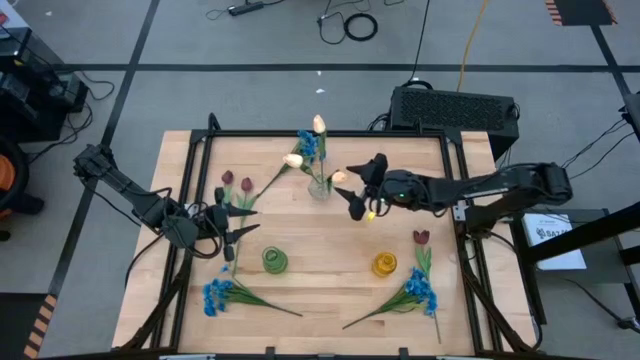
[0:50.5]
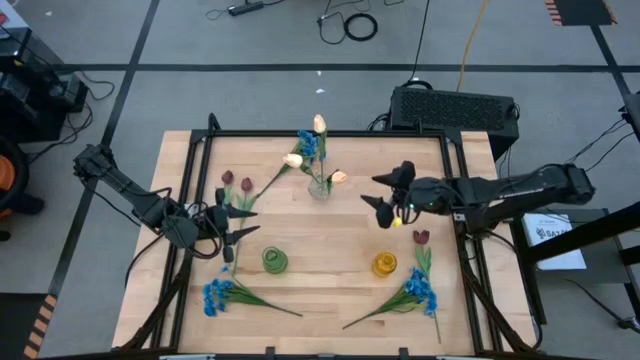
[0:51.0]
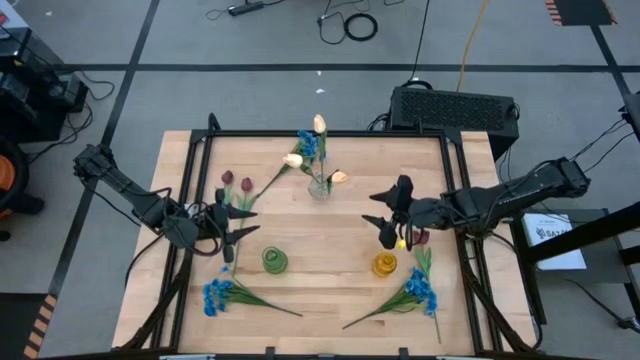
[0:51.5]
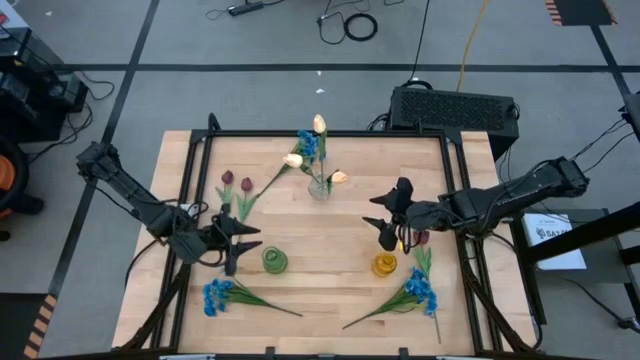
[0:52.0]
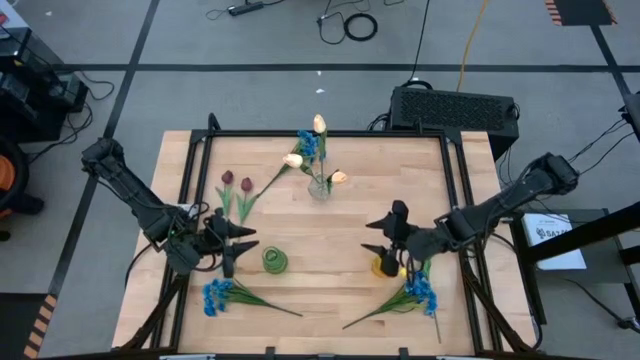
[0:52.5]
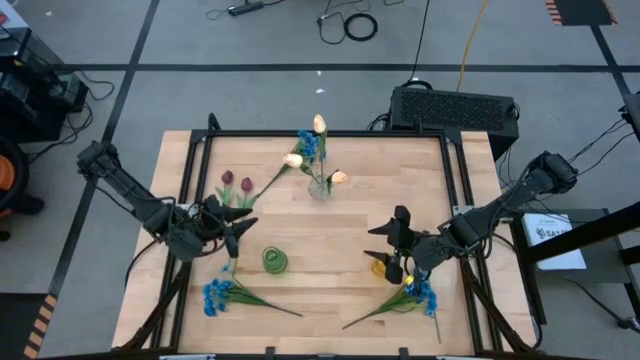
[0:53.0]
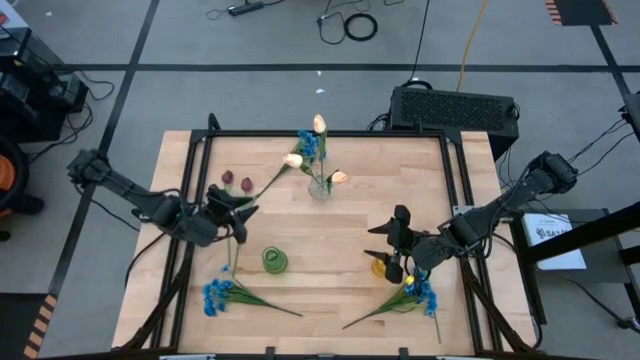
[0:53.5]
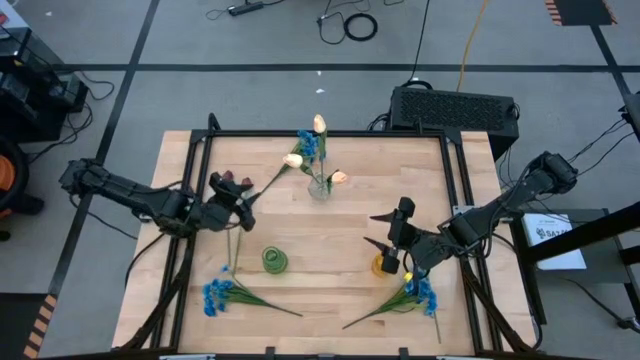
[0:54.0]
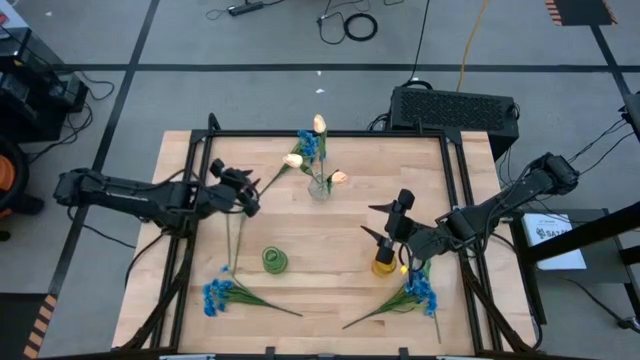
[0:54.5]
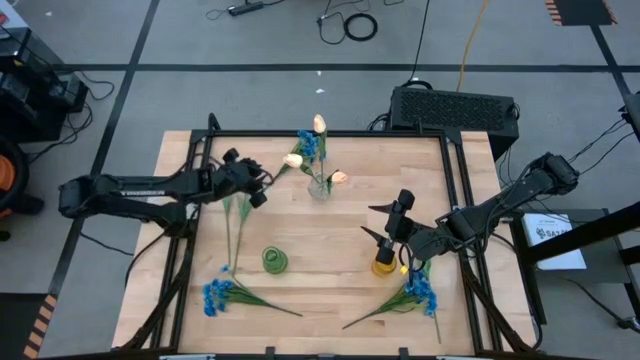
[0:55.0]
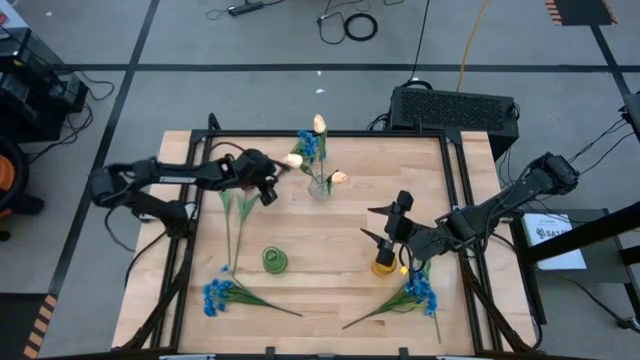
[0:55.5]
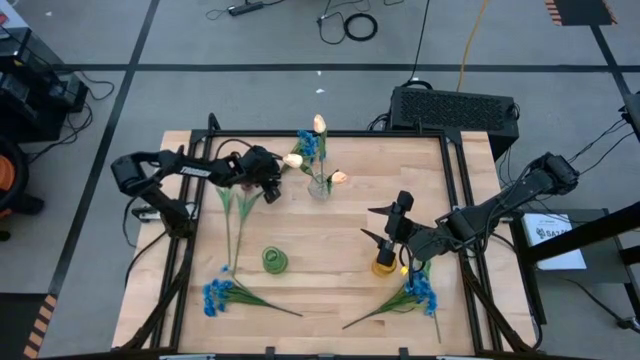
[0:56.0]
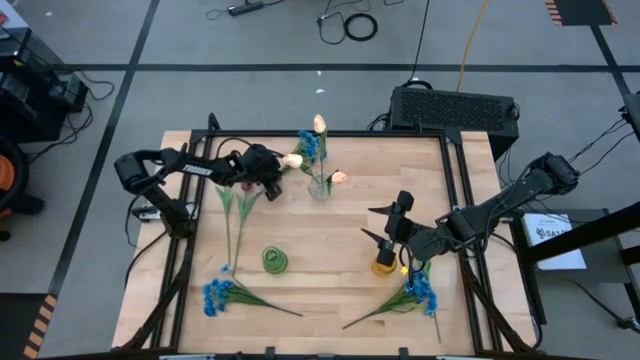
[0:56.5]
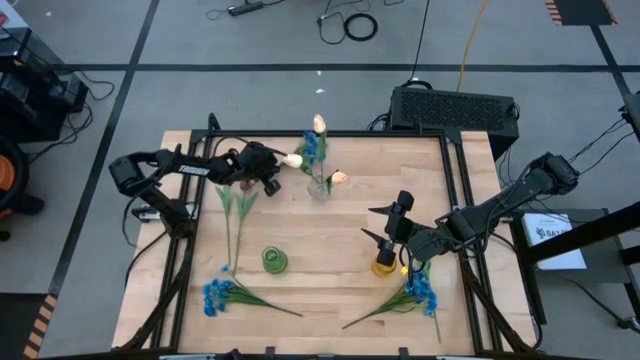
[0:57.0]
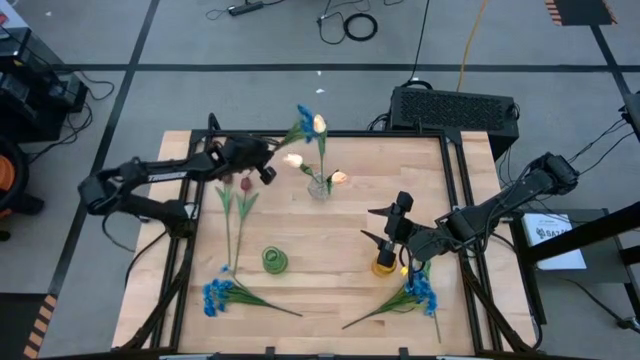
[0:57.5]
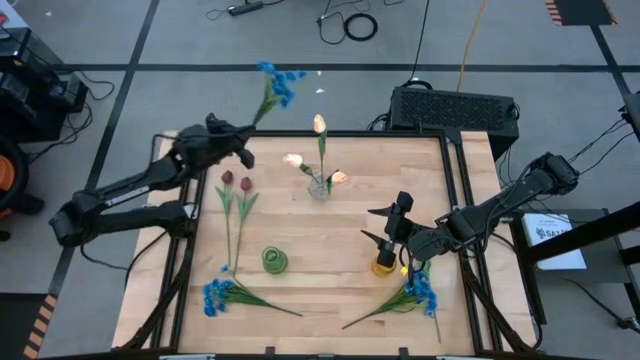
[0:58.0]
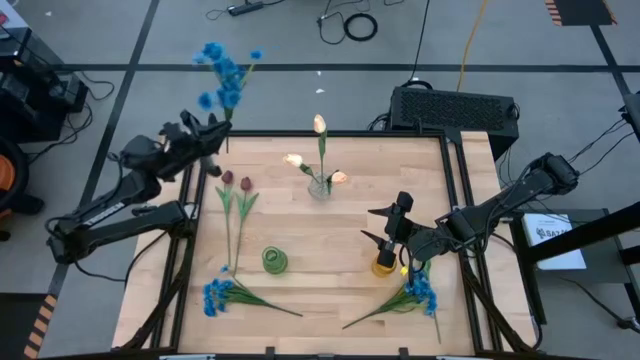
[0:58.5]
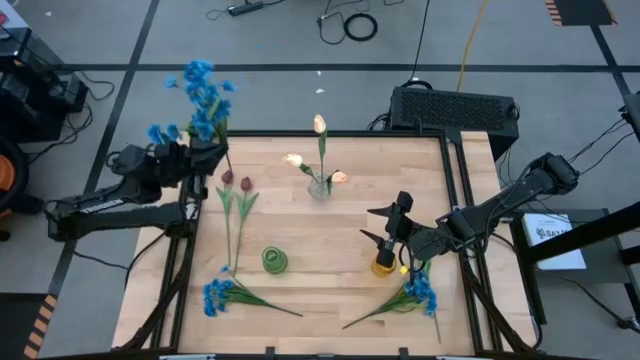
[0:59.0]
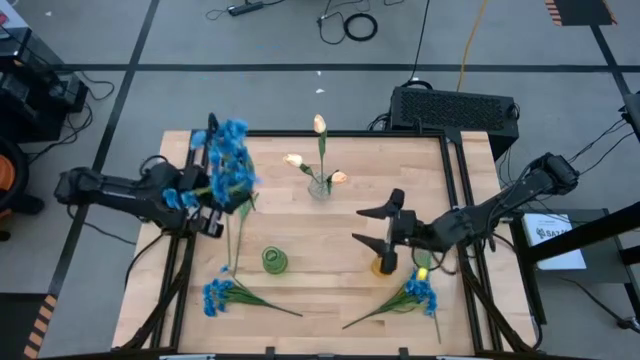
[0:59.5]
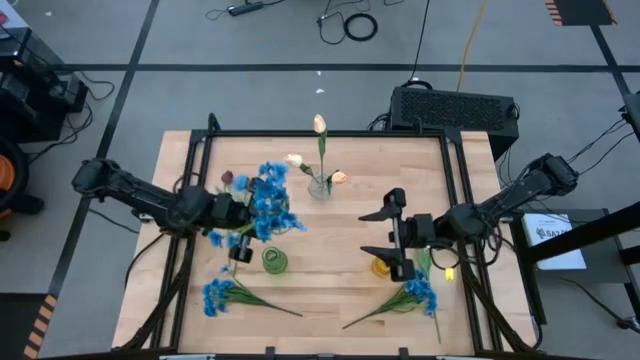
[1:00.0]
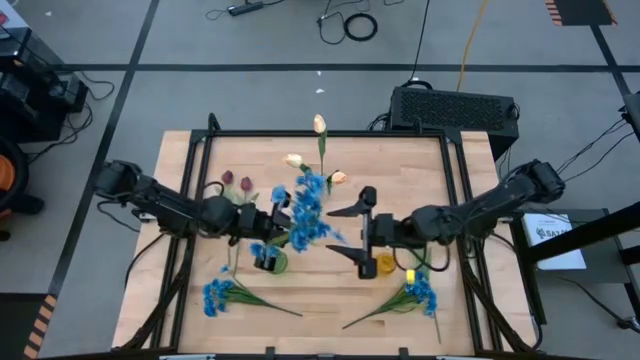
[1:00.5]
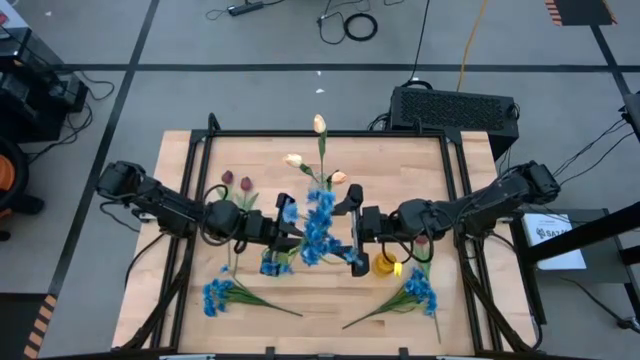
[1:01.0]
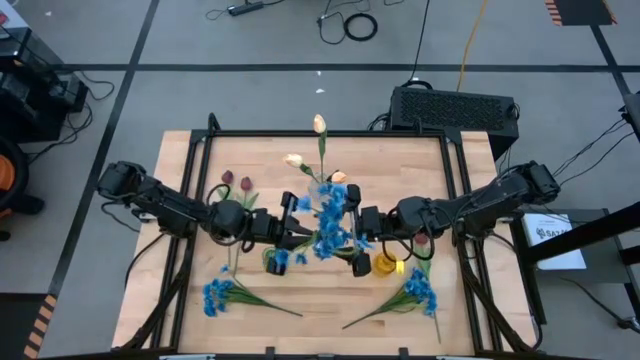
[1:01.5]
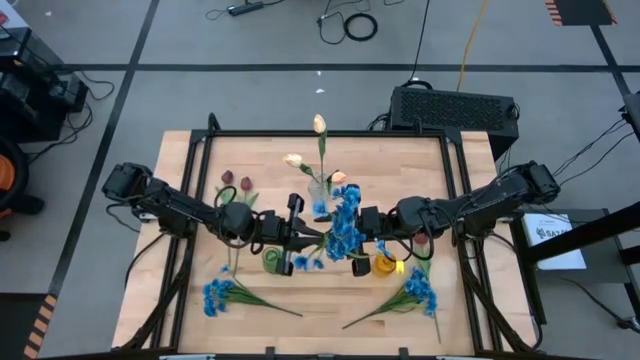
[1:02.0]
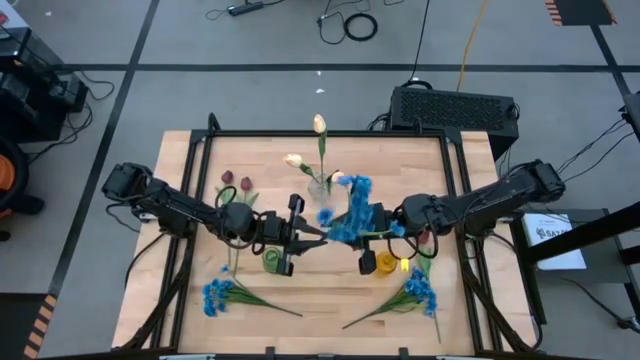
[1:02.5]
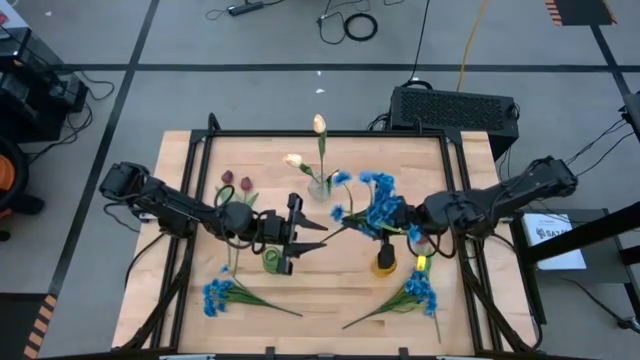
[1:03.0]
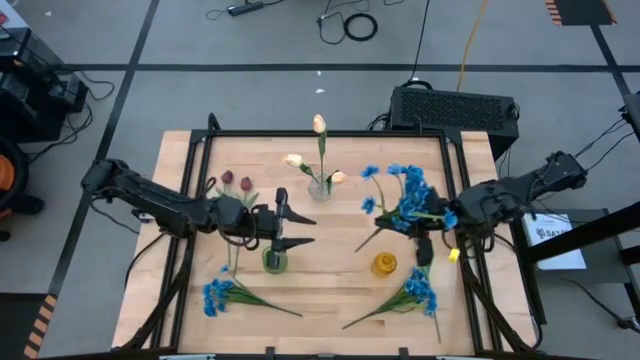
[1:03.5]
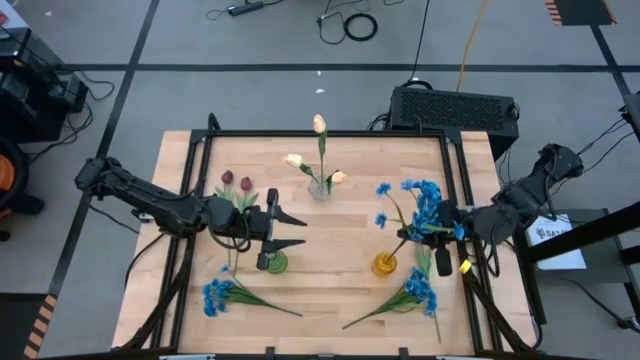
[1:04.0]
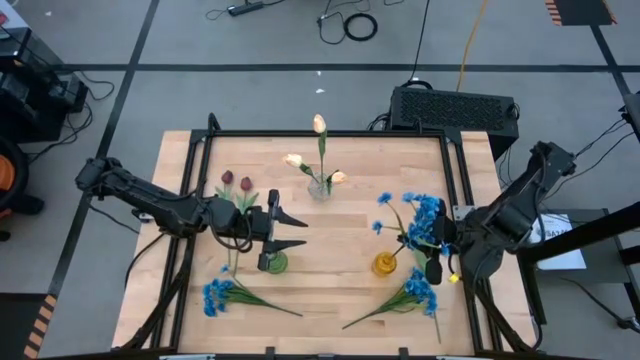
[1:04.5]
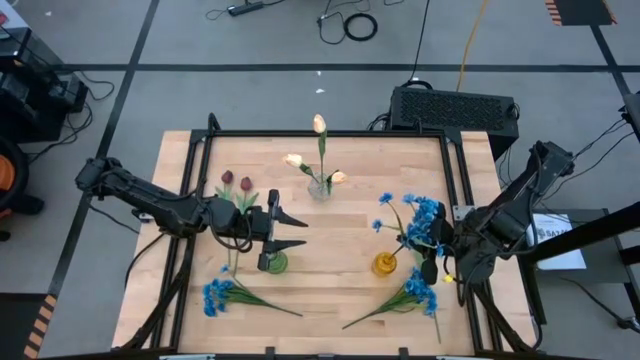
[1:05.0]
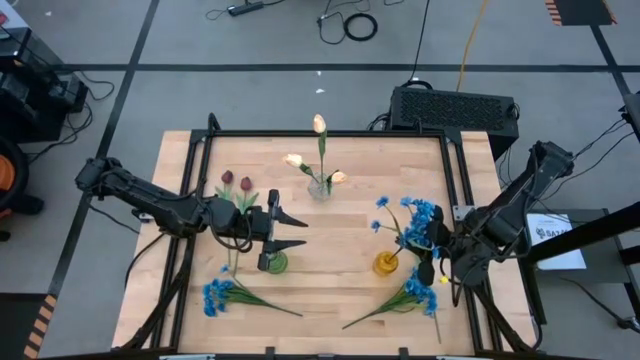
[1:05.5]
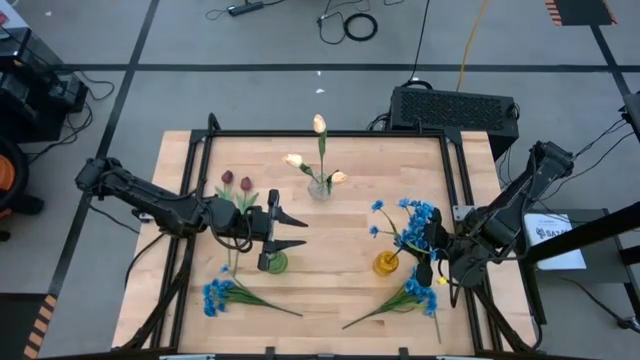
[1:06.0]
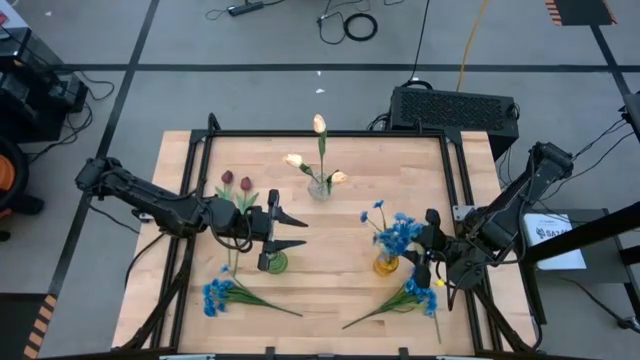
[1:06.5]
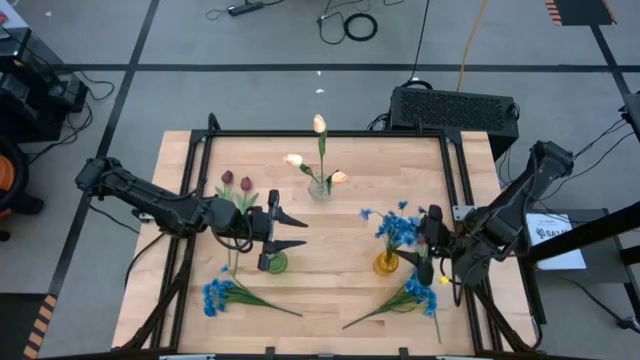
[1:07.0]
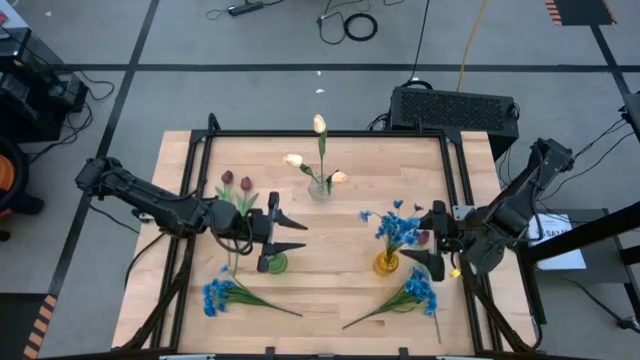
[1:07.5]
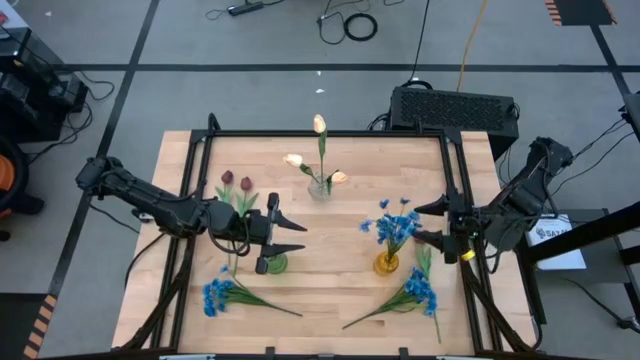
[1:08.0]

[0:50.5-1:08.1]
Task: Sort flowers into vase by color
Put the top blue flowers into the yellow vase

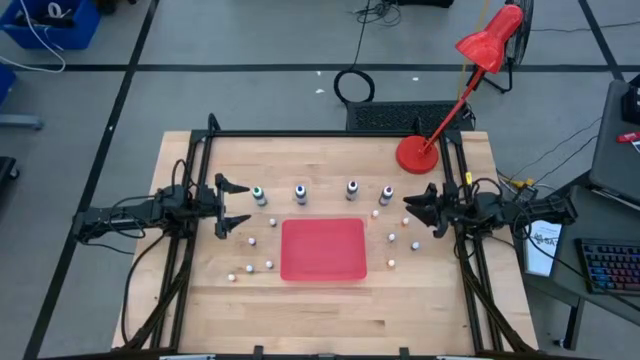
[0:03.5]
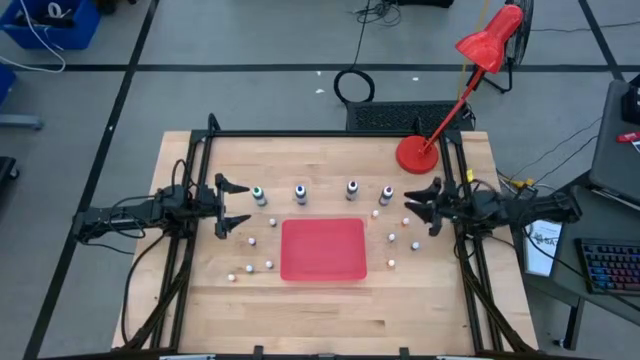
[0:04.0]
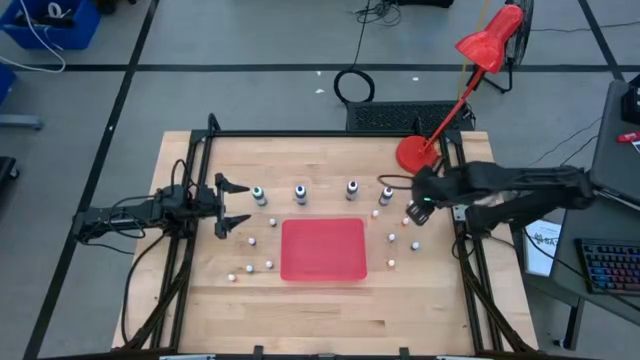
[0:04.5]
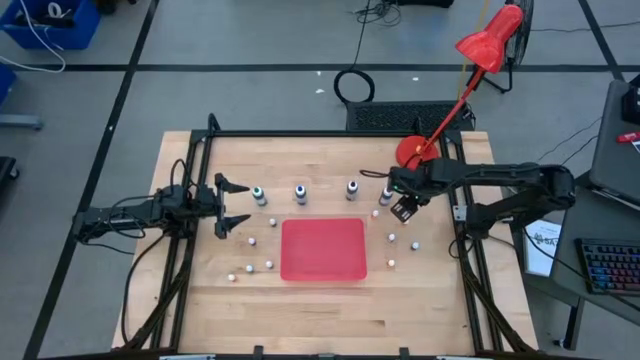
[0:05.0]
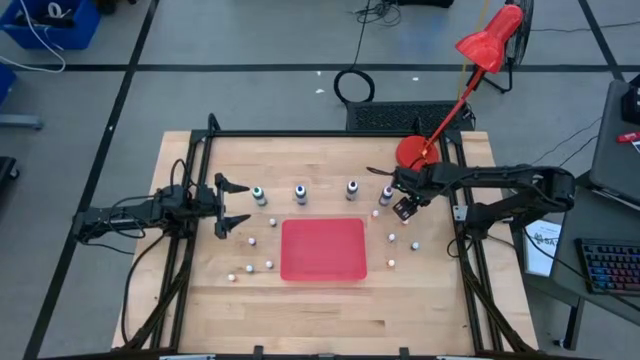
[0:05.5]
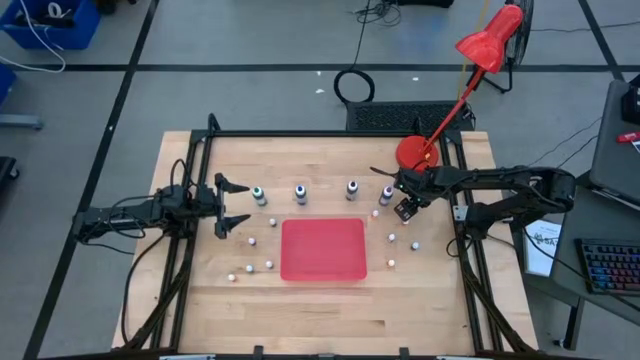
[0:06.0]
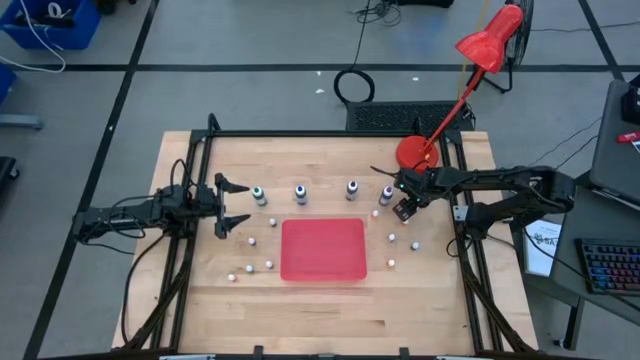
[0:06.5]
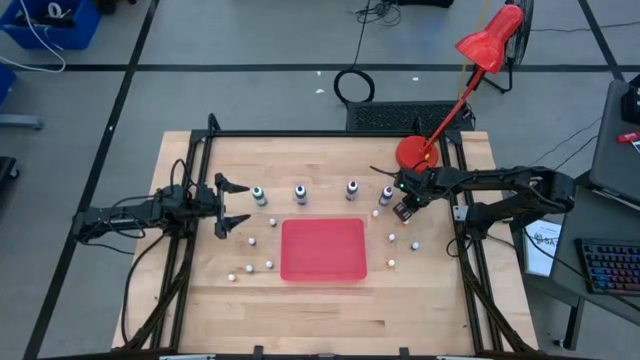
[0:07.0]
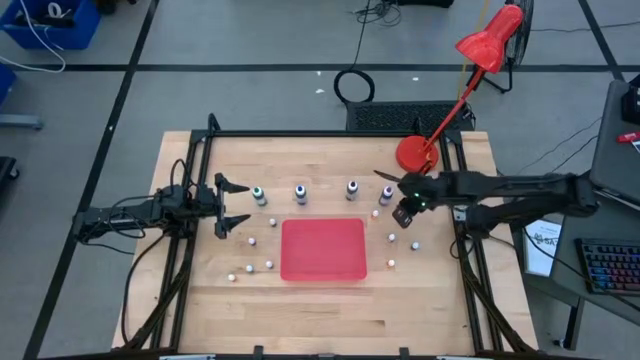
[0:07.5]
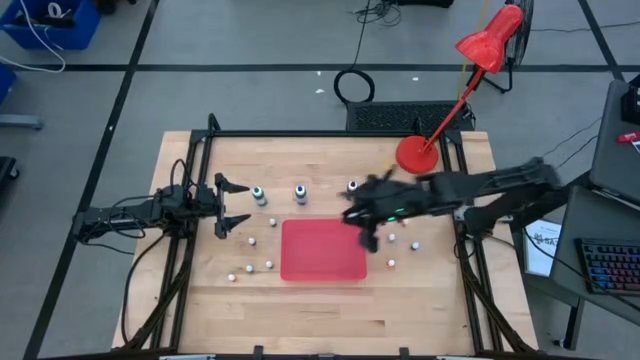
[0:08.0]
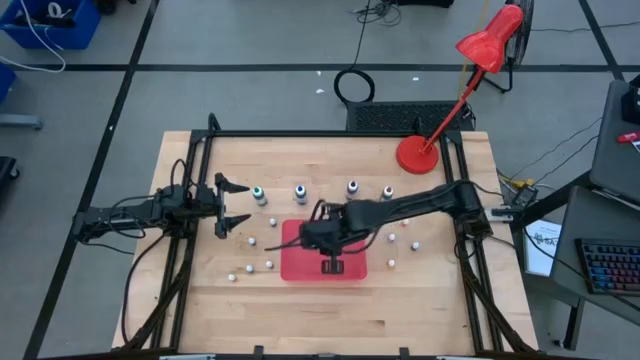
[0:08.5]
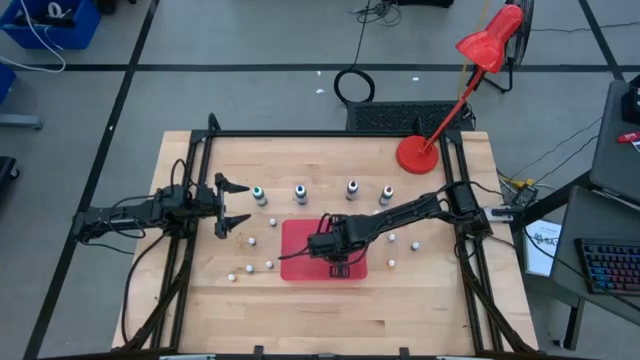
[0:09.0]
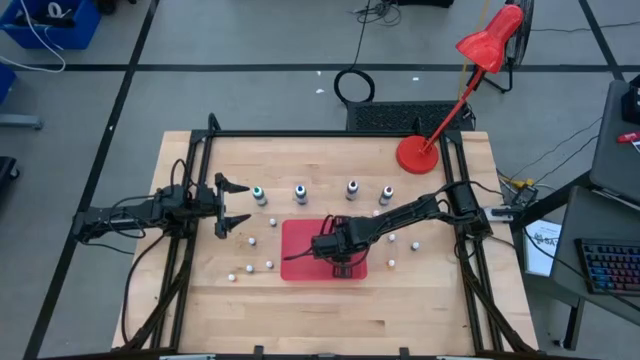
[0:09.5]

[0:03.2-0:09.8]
Task: Pick & Place food coloring
Put the small purple food coloring bottle into the pink bin
